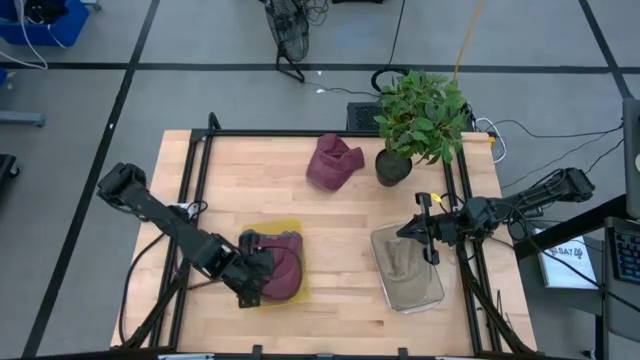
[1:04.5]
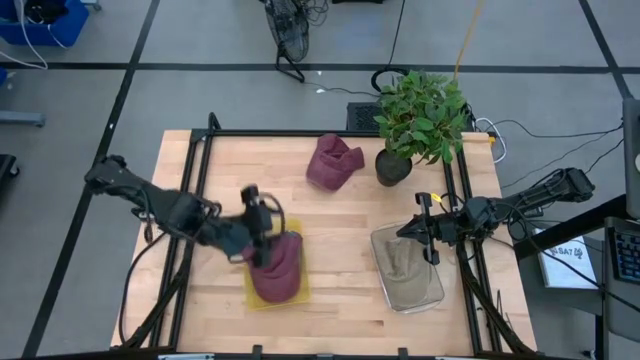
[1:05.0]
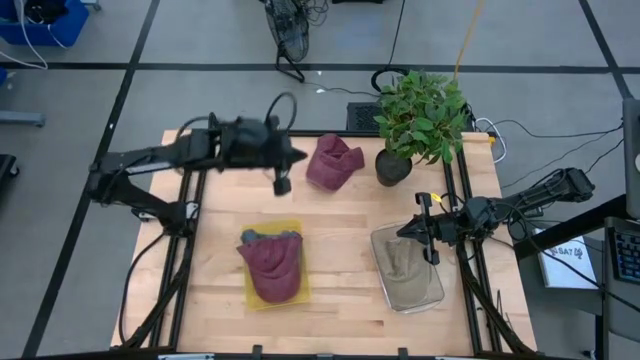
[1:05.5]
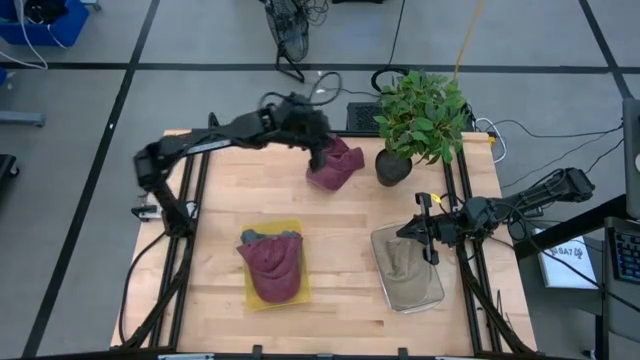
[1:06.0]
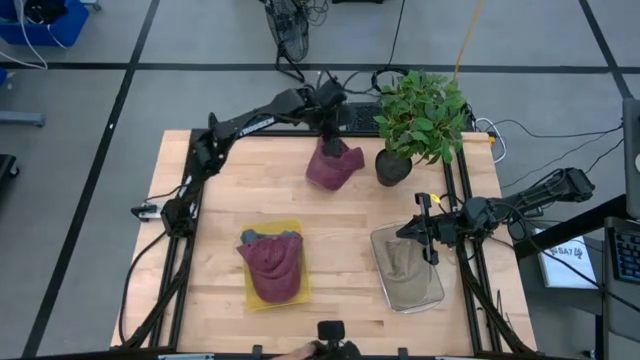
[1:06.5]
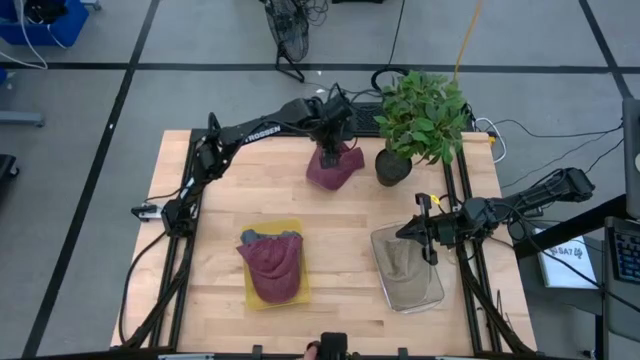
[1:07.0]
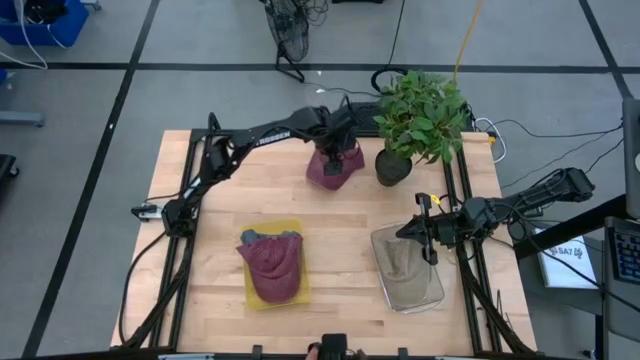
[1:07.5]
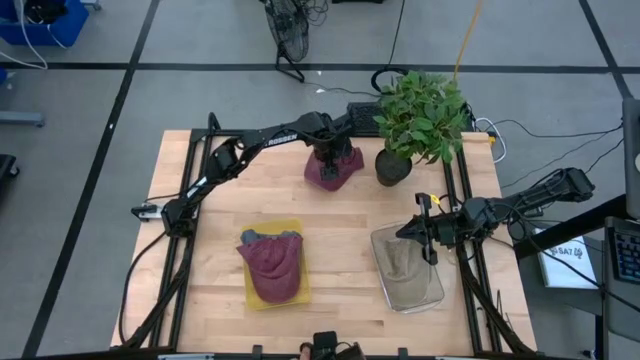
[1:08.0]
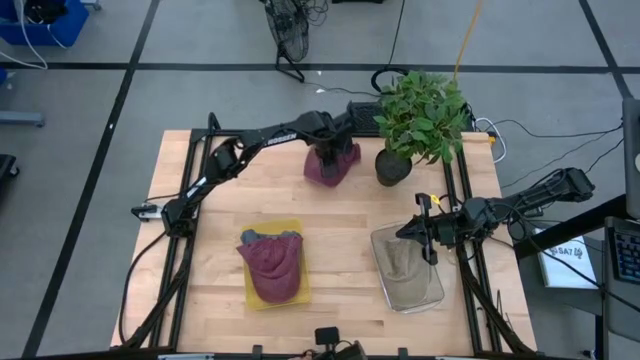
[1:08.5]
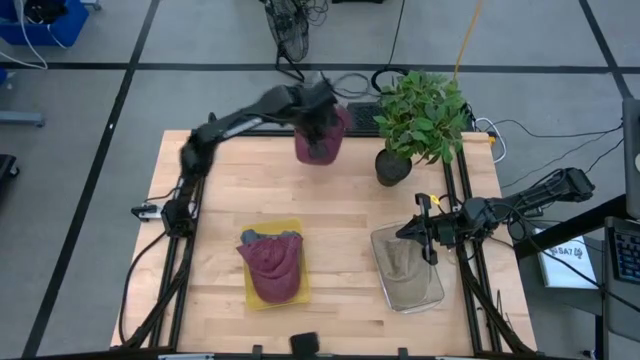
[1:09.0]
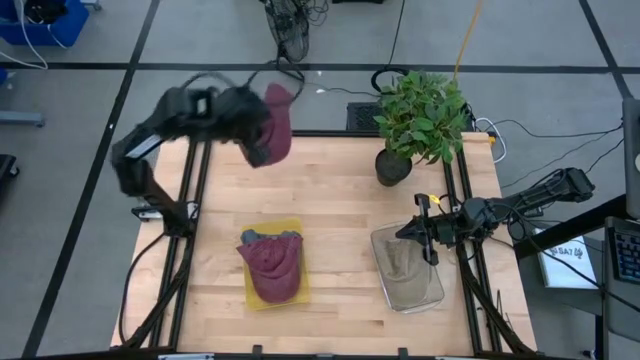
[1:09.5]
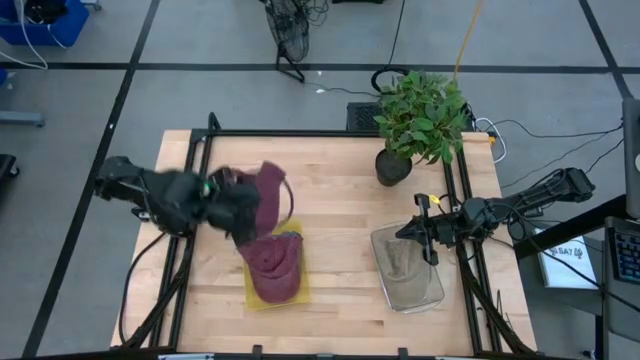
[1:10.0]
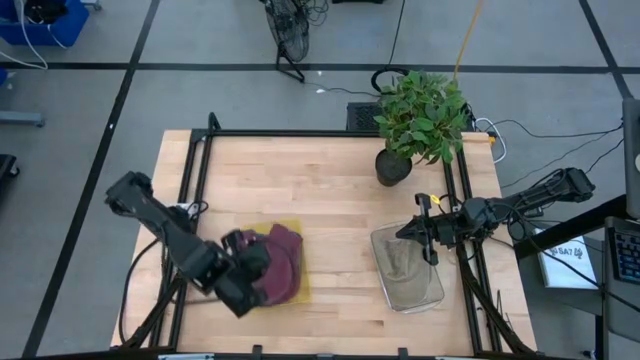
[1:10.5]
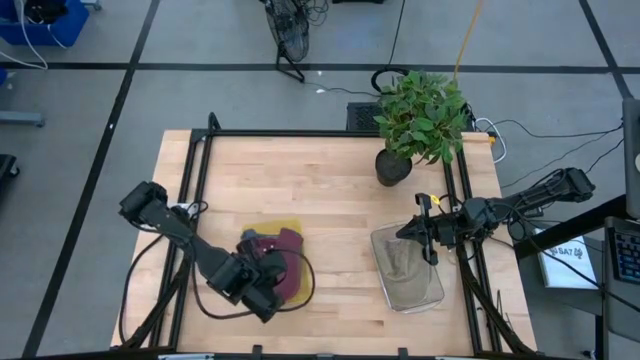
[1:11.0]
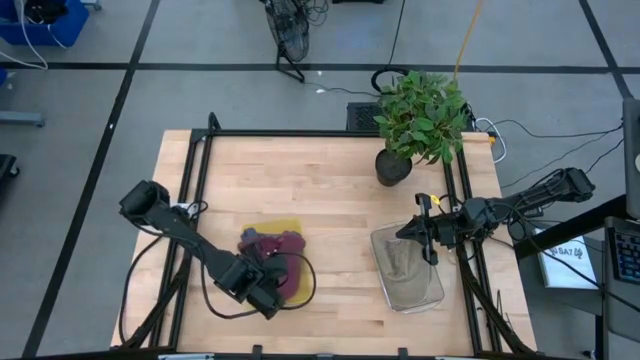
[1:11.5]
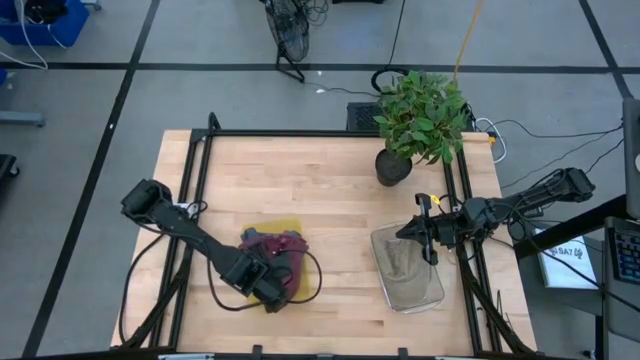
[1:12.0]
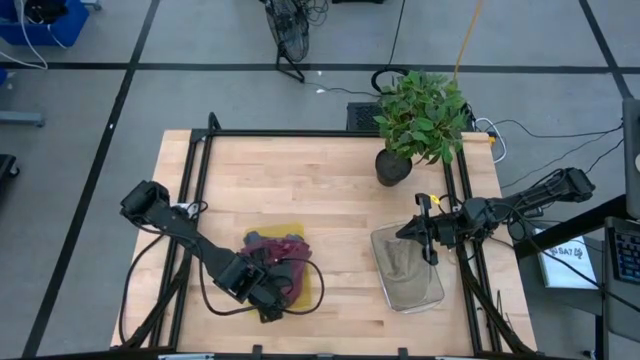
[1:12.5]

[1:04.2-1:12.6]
Task: Pick & Place hat
Put the red cap into the yellow bin

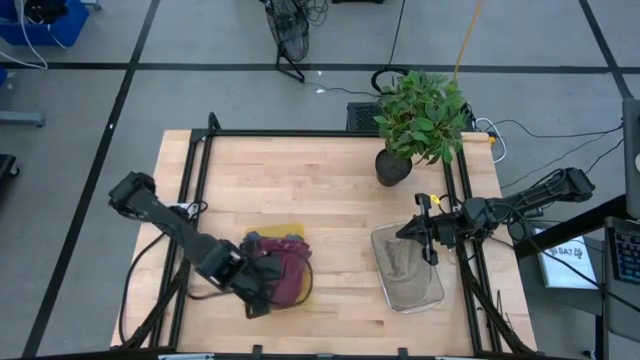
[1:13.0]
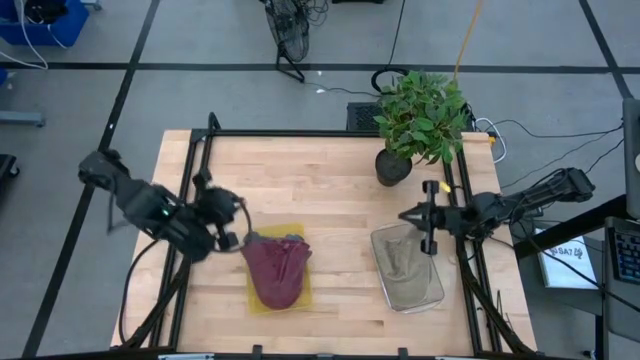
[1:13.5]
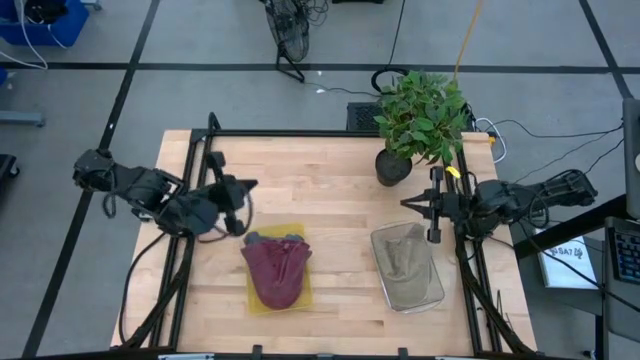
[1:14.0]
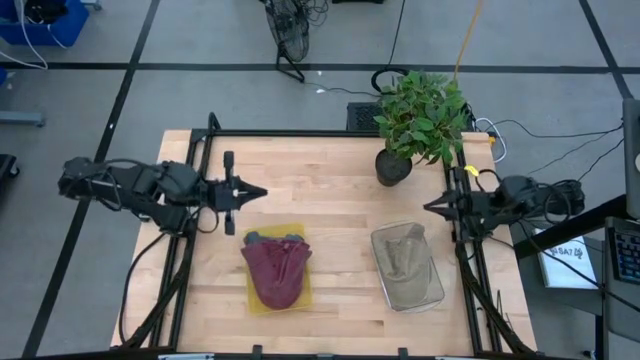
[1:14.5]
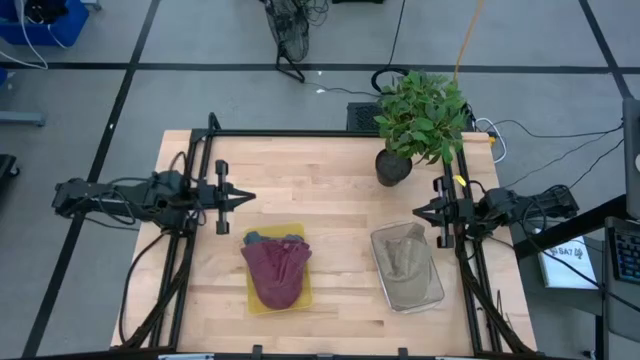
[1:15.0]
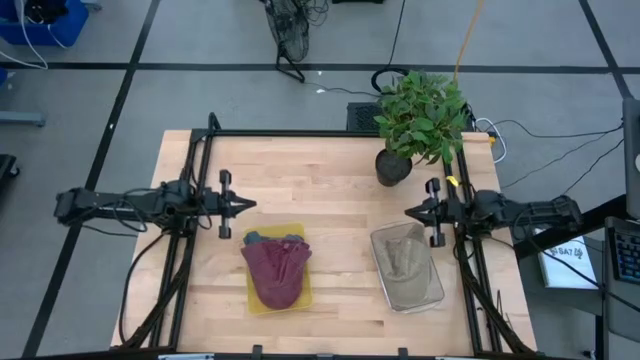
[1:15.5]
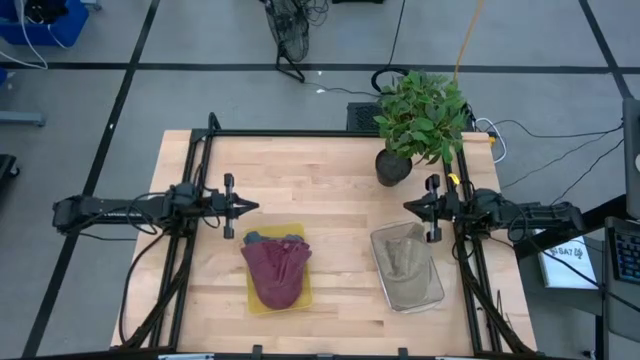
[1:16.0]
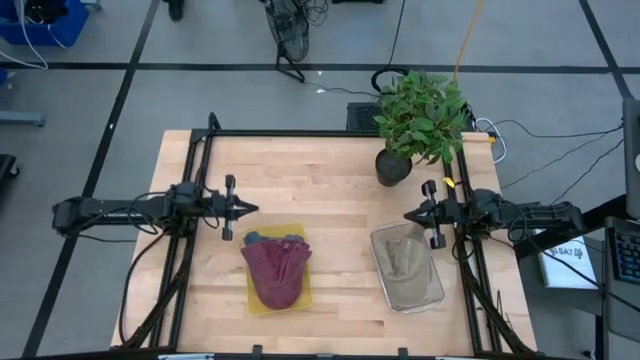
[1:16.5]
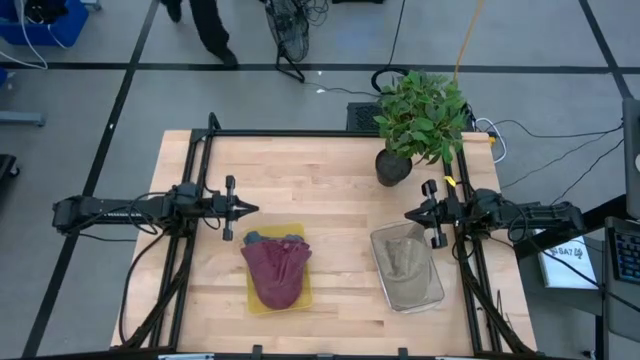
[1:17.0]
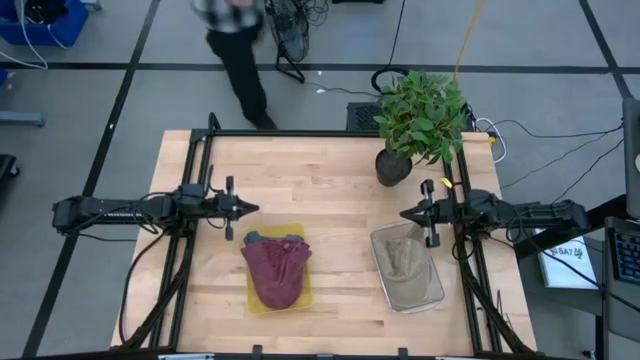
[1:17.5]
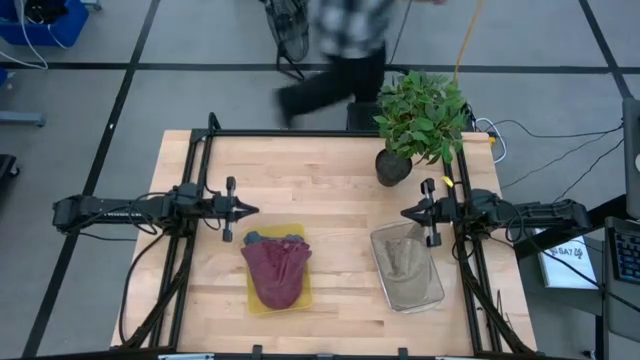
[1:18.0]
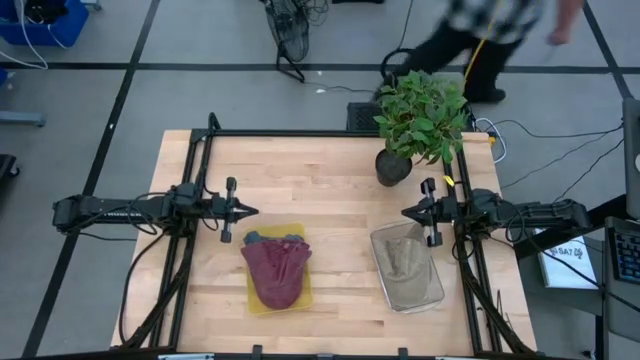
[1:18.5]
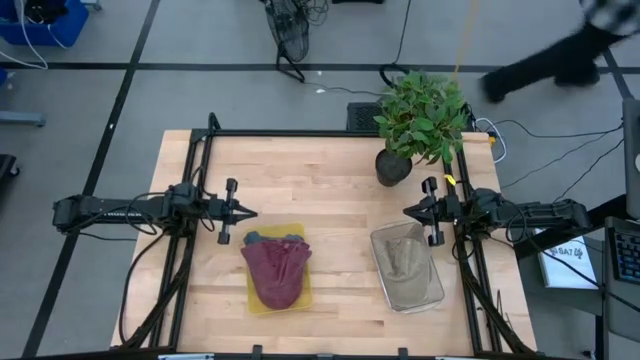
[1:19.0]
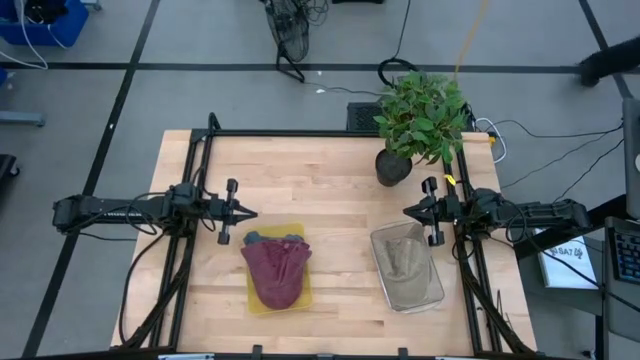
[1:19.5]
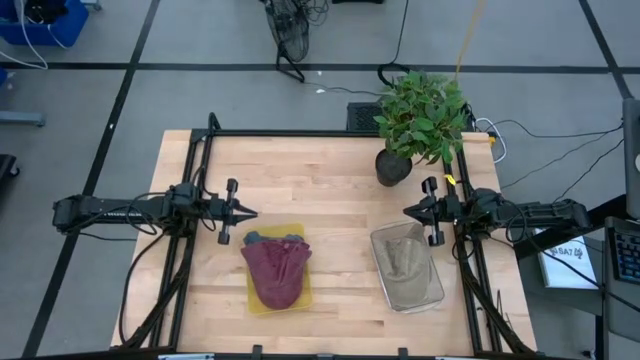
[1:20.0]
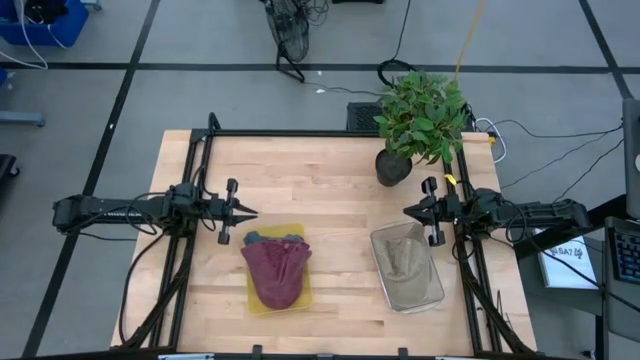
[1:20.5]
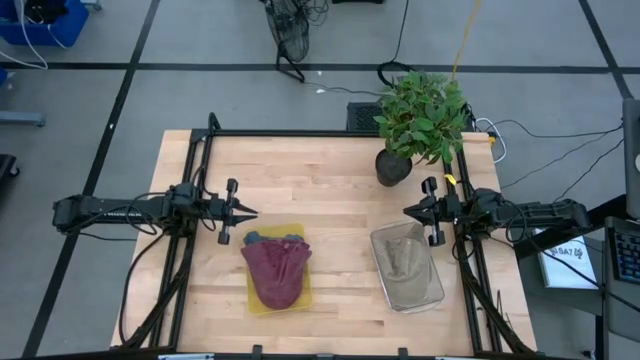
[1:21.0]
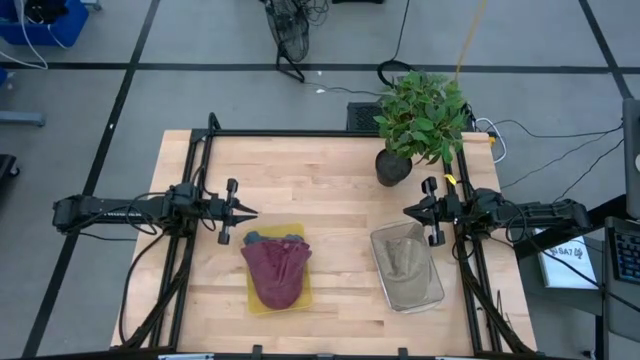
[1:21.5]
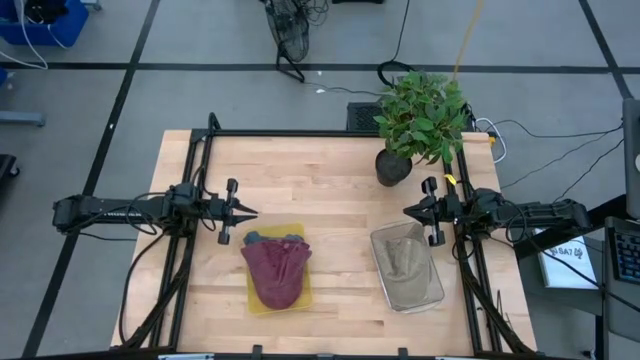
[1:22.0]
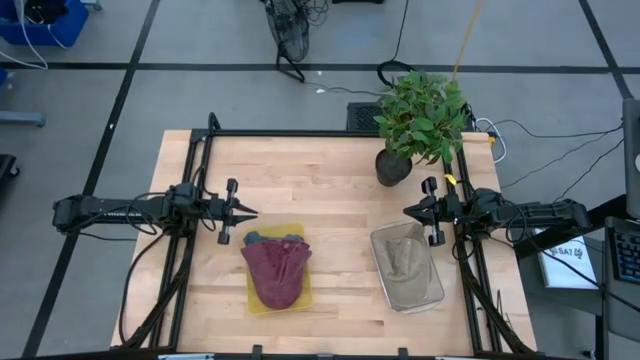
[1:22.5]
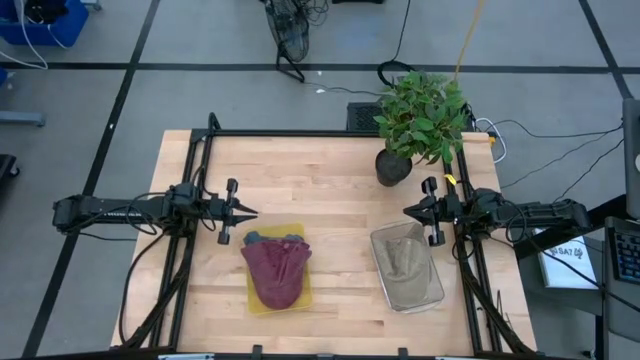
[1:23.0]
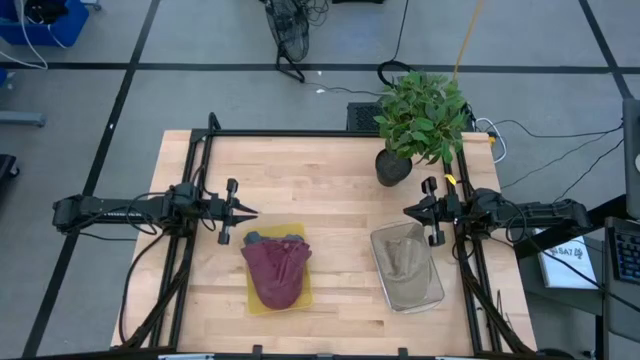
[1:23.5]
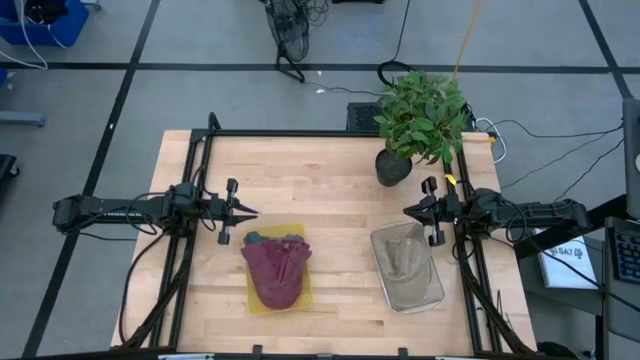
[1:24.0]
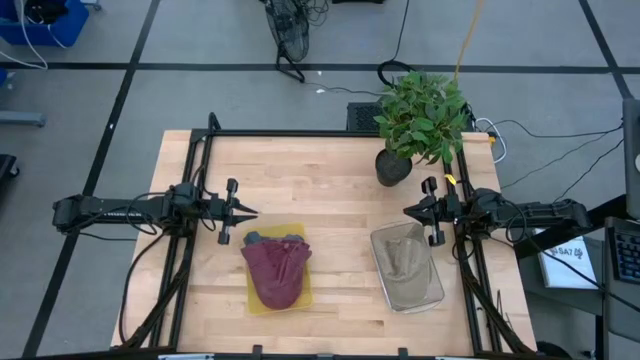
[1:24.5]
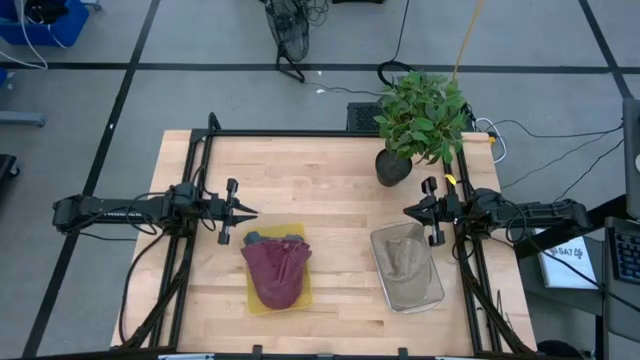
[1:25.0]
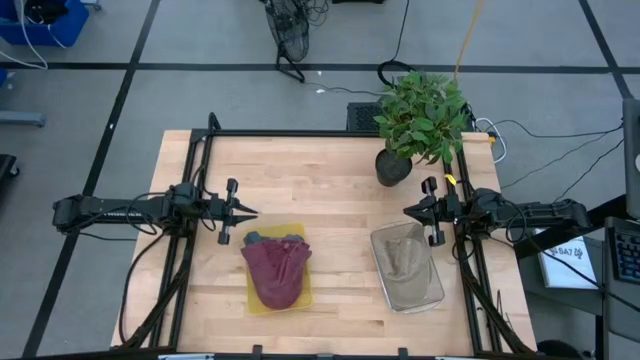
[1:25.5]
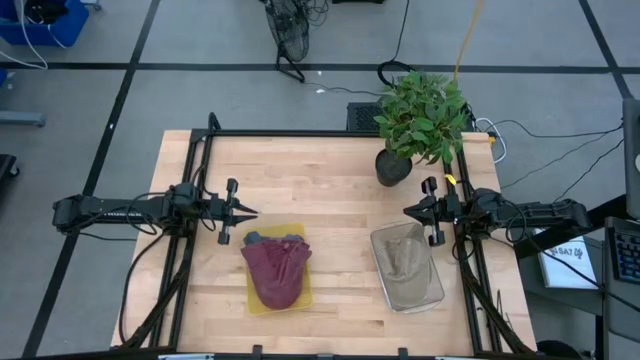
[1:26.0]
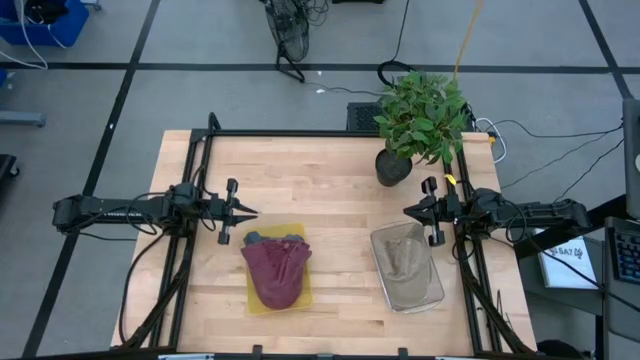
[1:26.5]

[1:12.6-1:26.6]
Return to Home Position
